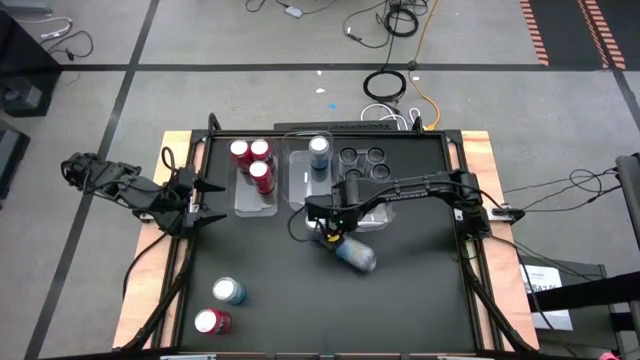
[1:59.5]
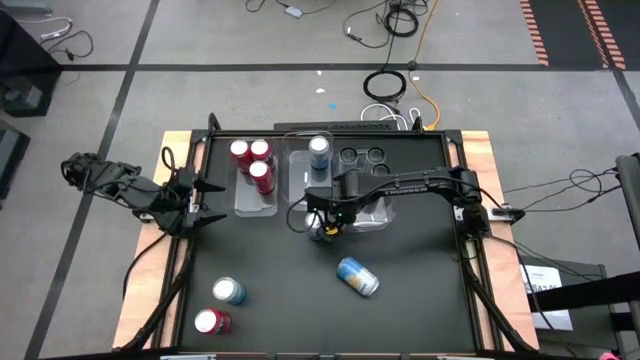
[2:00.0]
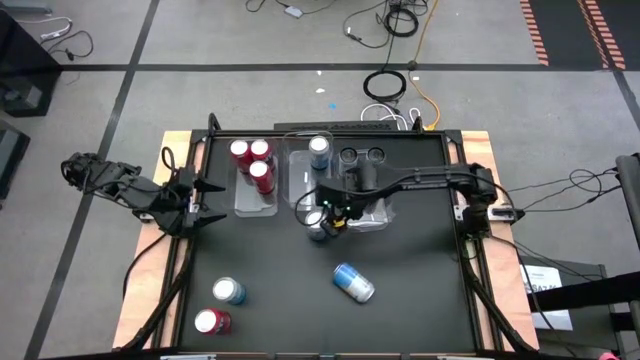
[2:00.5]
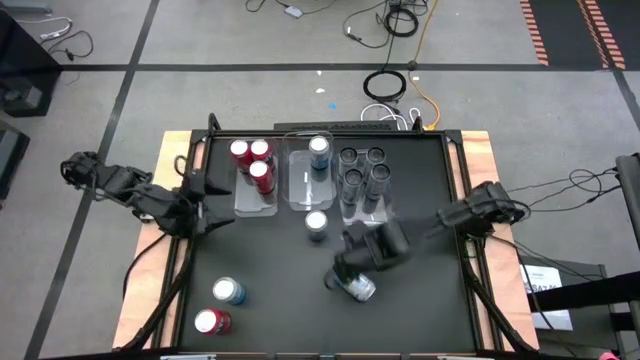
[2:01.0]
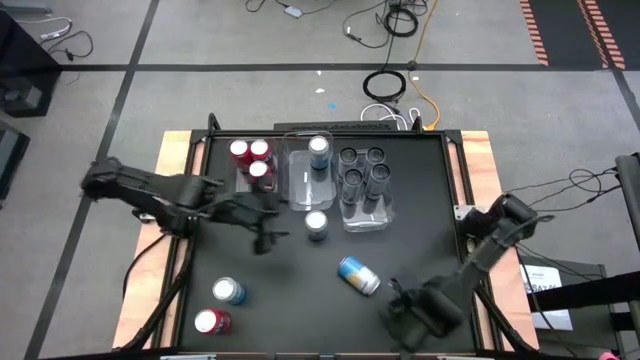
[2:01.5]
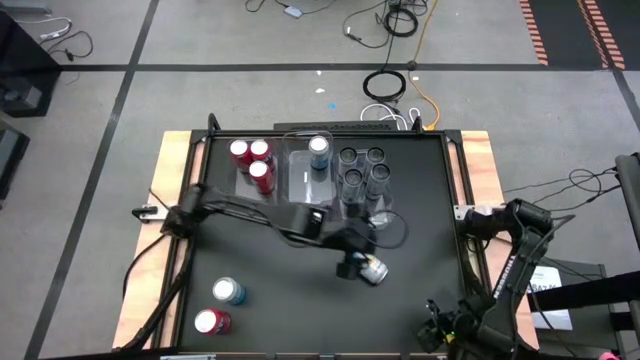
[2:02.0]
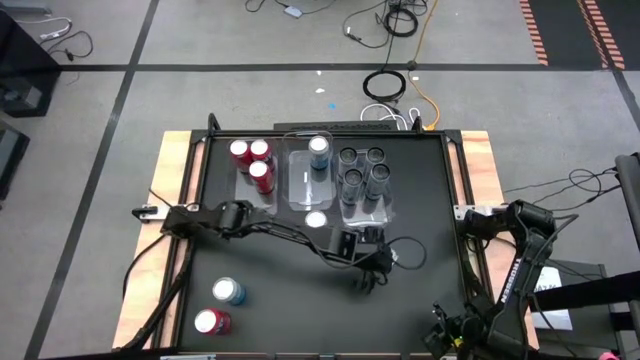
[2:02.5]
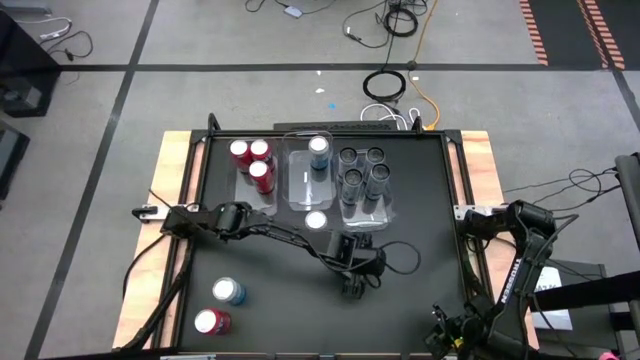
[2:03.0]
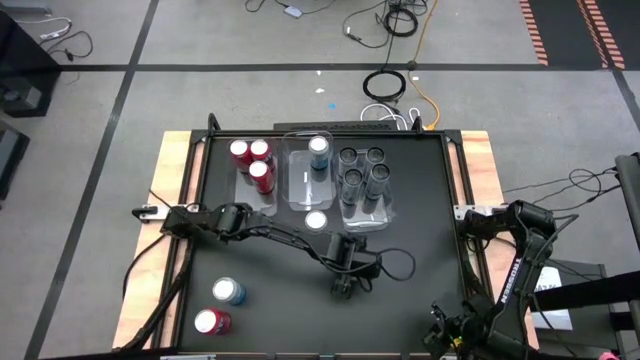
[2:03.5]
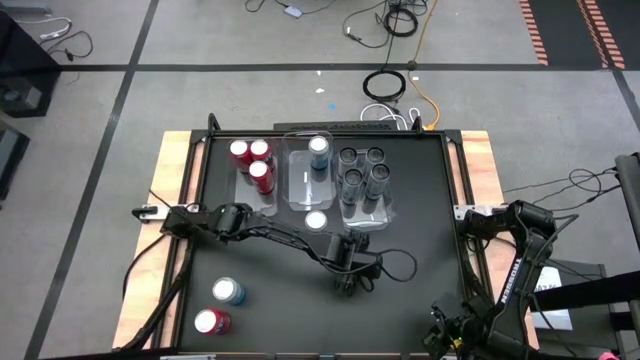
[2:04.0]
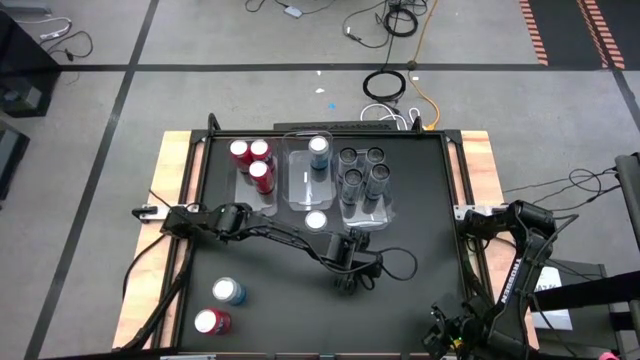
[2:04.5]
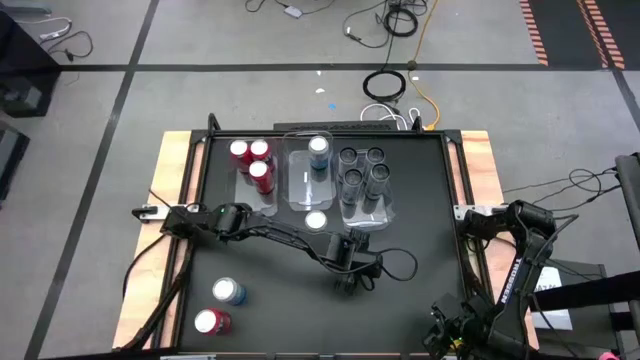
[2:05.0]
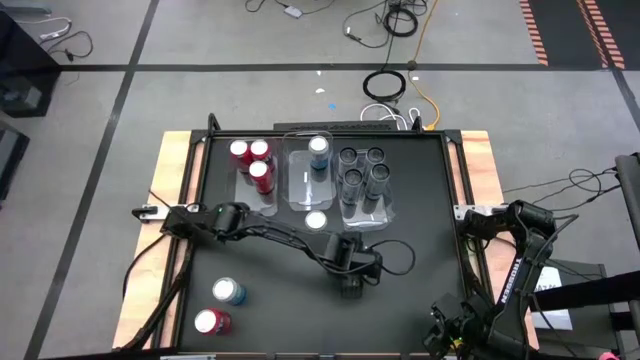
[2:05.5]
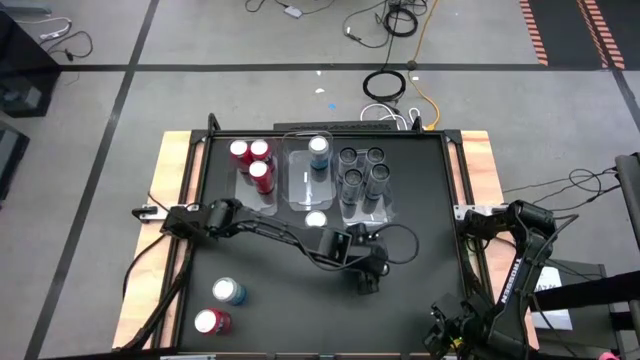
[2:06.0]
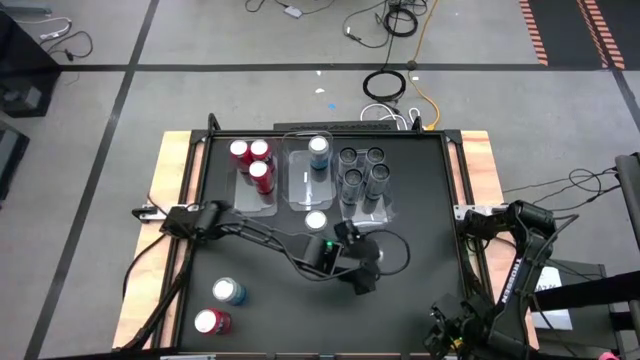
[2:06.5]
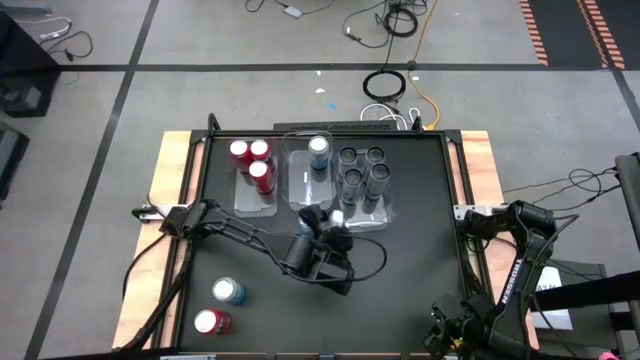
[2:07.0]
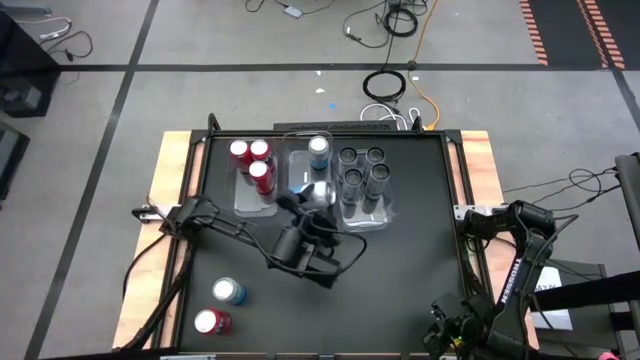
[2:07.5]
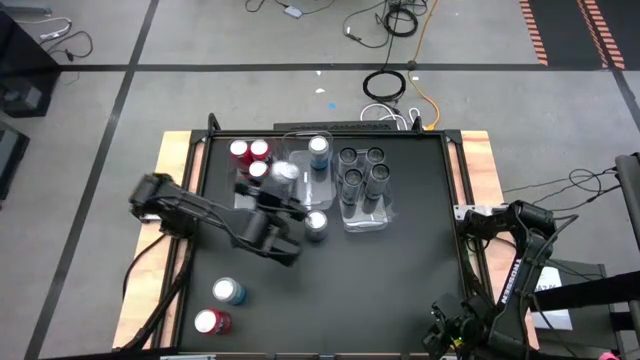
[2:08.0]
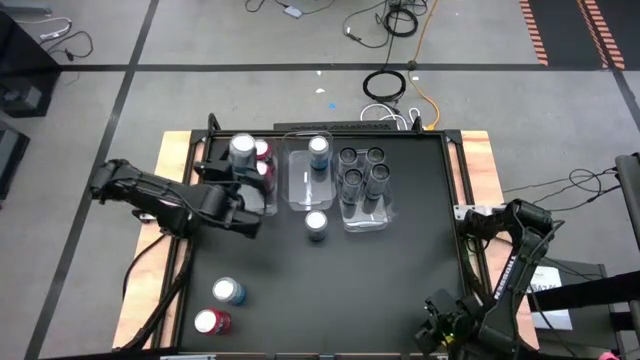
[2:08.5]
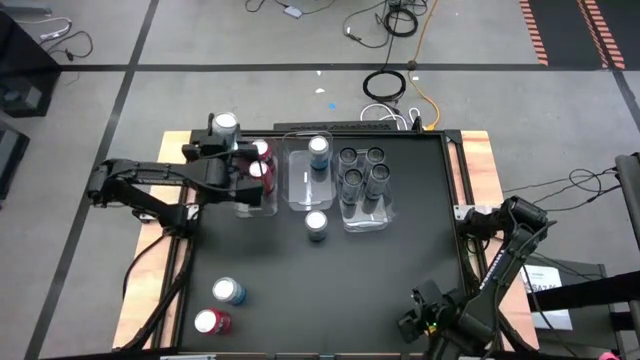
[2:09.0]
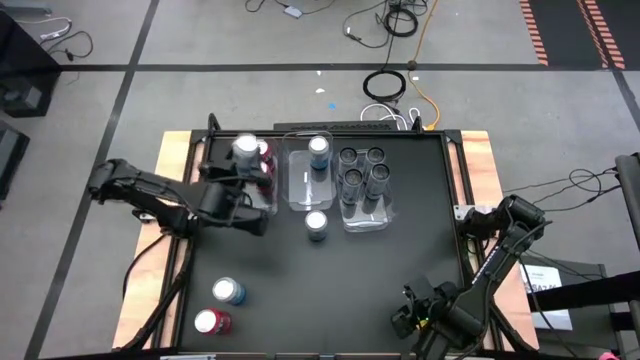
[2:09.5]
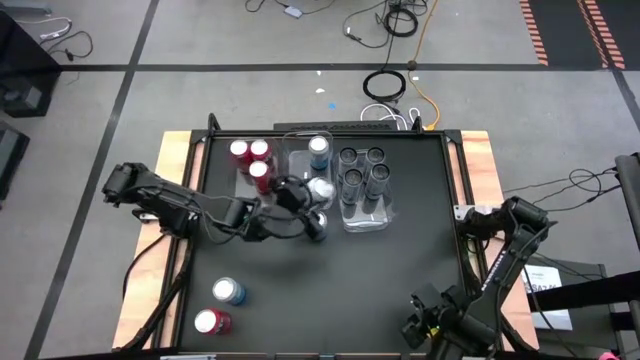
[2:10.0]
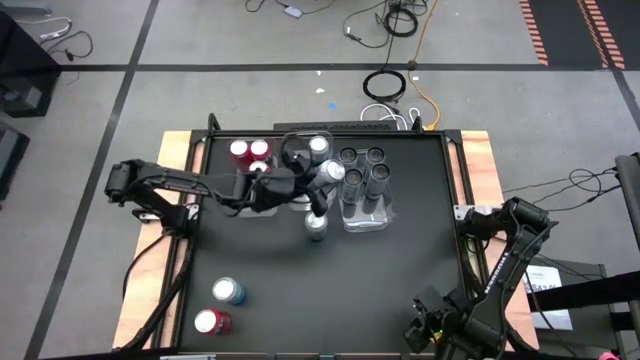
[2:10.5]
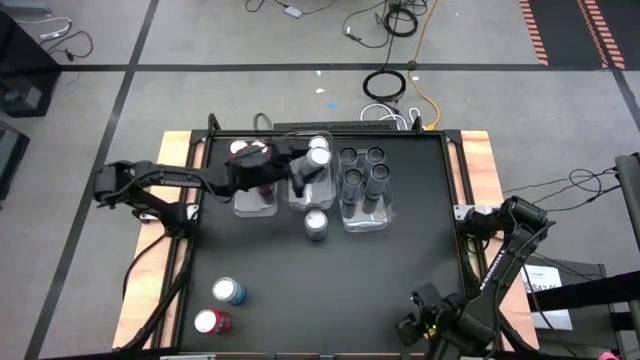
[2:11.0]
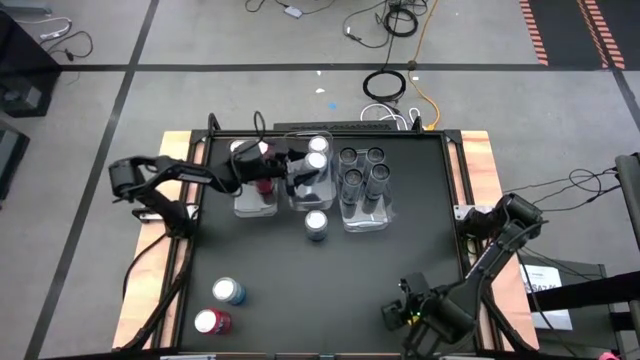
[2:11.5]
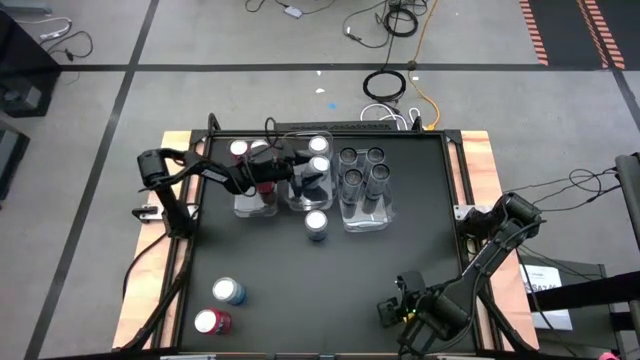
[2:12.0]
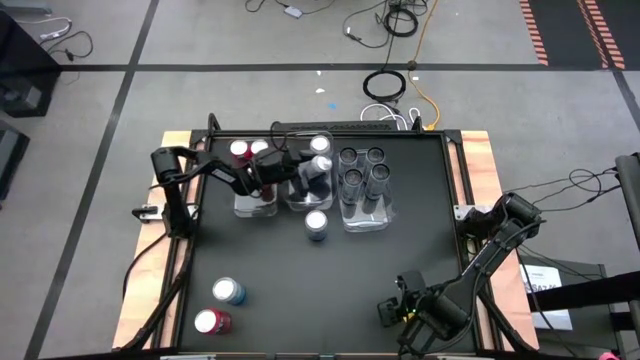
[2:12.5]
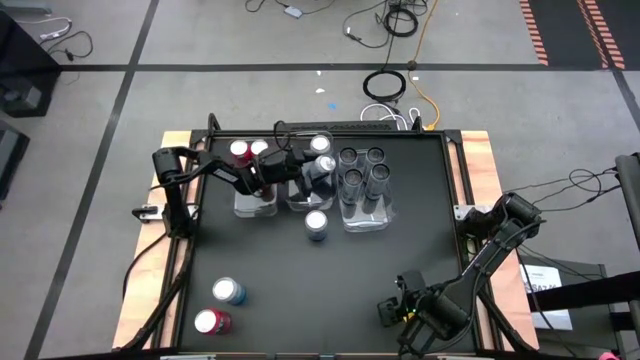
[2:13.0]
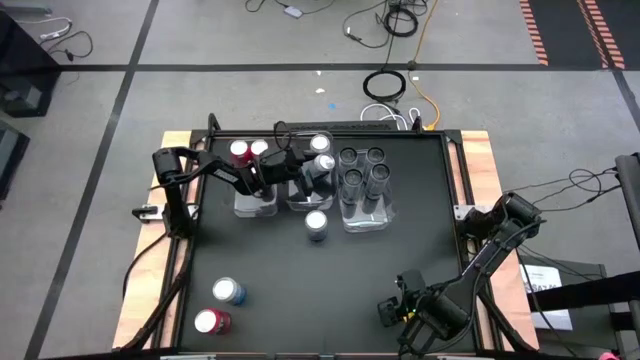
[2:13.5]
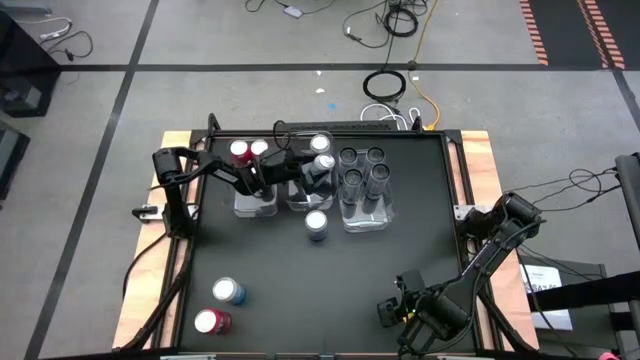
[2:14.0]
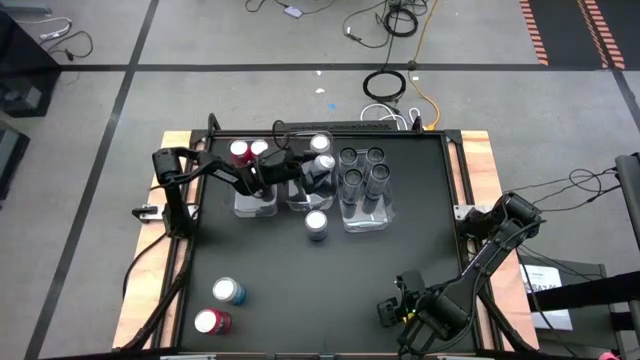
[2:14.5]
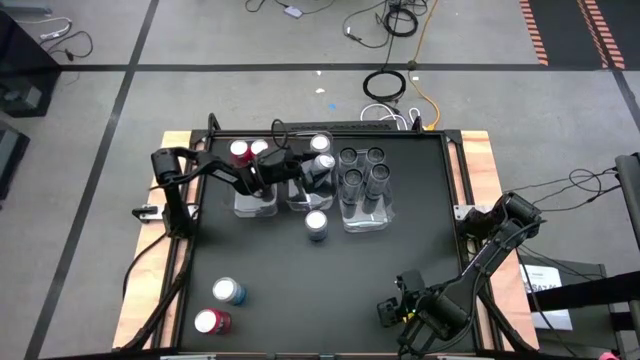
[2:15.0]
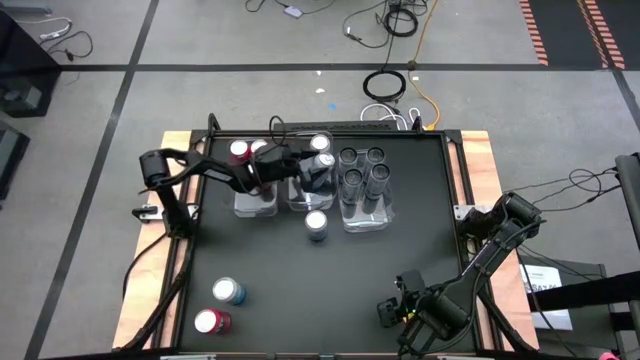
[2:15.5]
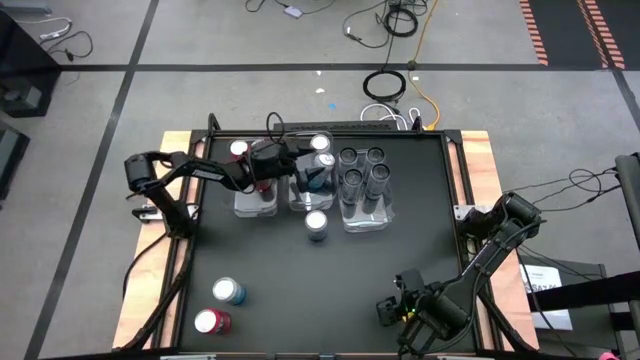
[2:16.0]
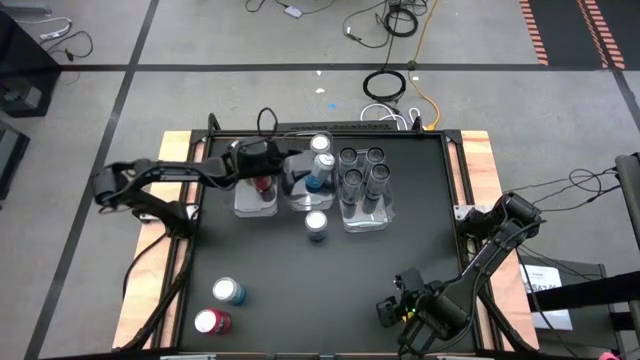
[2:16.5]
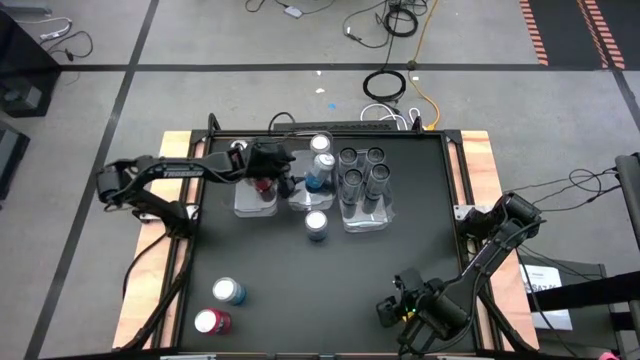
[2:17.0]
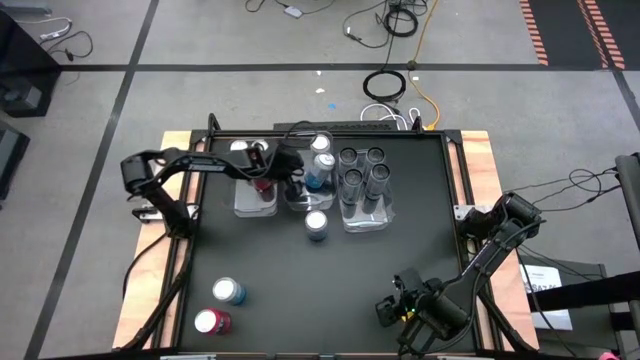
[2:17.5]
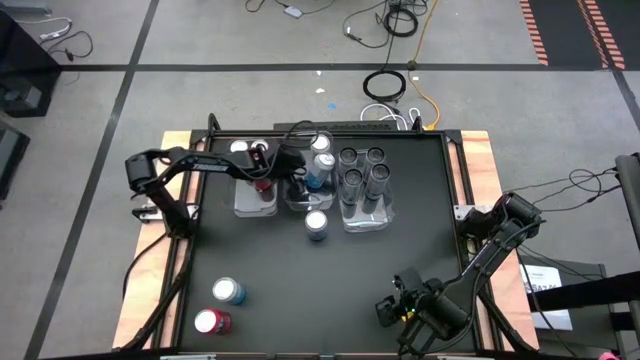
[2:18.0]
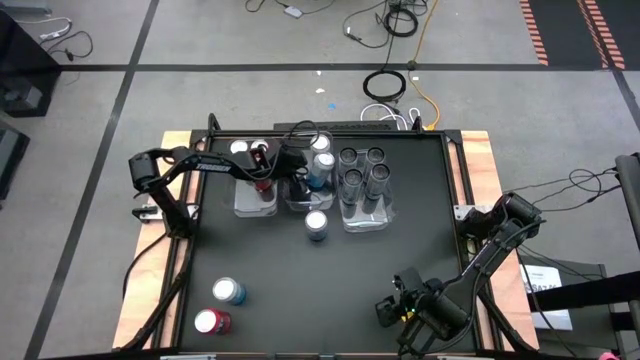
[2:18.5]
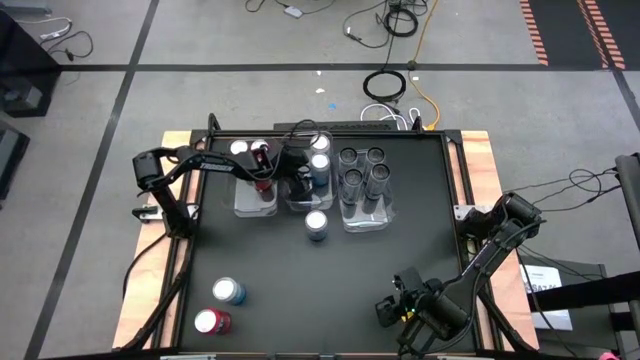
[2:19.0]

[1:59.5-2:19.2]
Task: Sort soda cans
Put the blue and white soda can into the middle transparent bin
